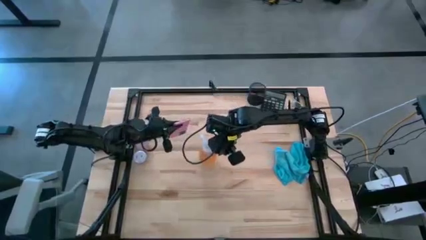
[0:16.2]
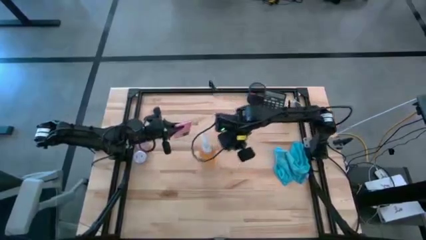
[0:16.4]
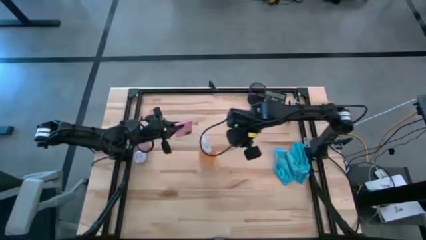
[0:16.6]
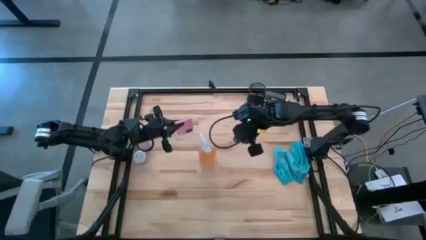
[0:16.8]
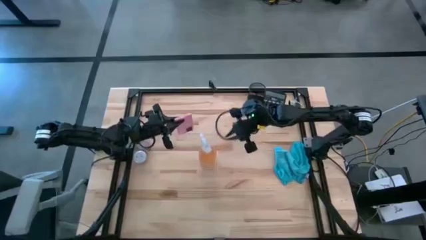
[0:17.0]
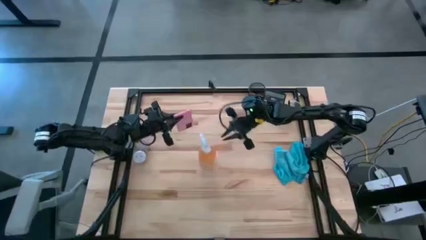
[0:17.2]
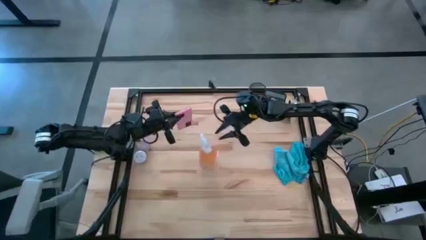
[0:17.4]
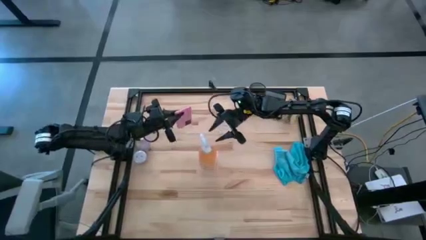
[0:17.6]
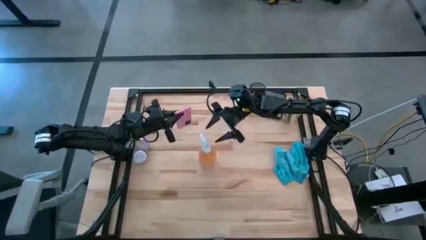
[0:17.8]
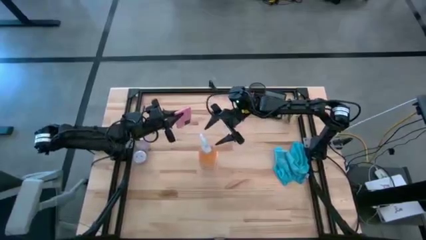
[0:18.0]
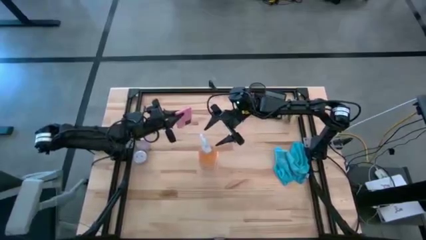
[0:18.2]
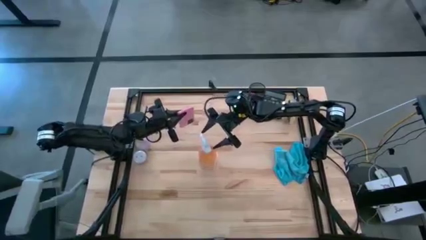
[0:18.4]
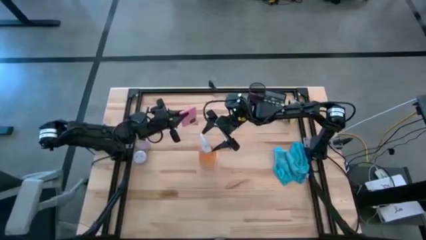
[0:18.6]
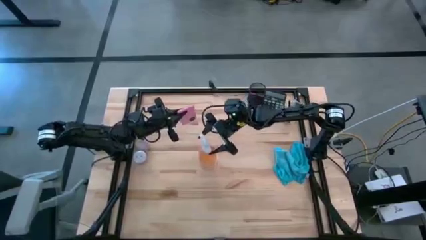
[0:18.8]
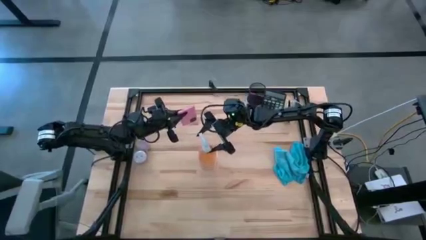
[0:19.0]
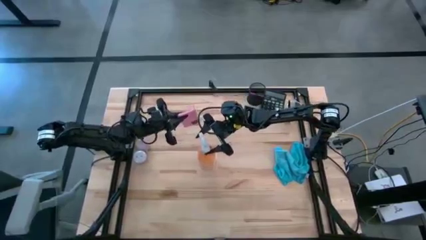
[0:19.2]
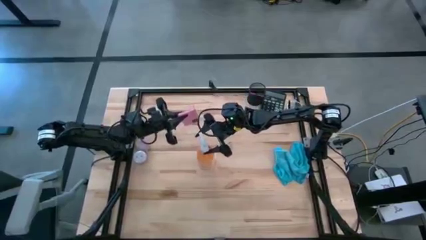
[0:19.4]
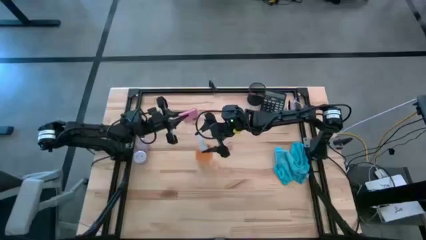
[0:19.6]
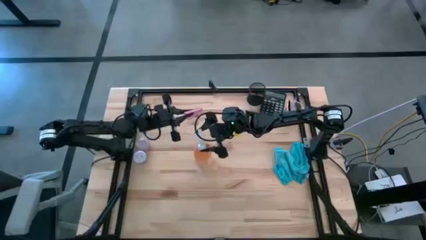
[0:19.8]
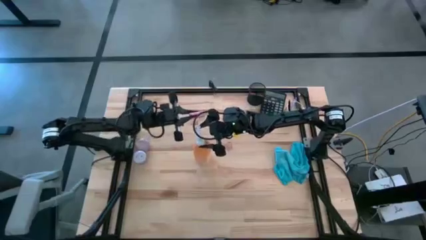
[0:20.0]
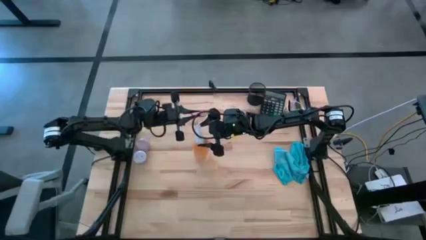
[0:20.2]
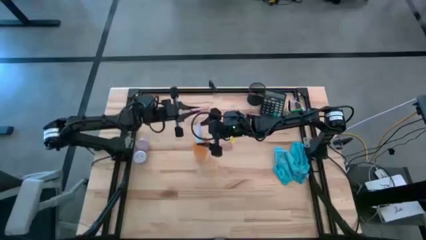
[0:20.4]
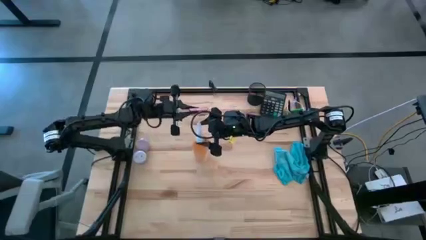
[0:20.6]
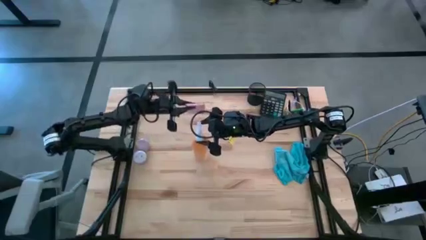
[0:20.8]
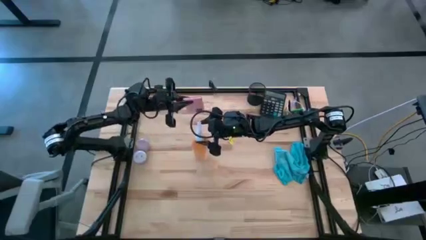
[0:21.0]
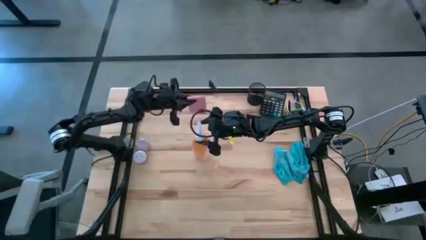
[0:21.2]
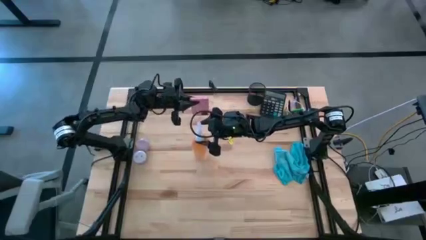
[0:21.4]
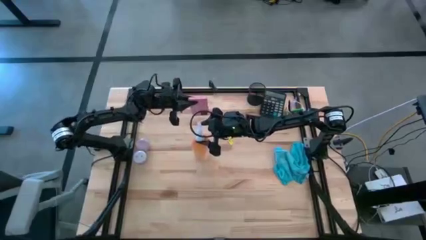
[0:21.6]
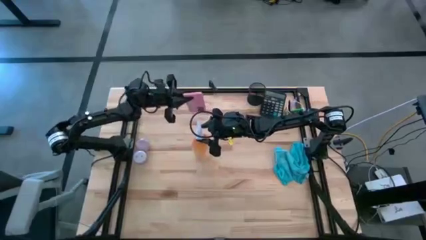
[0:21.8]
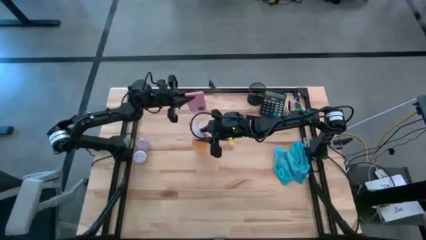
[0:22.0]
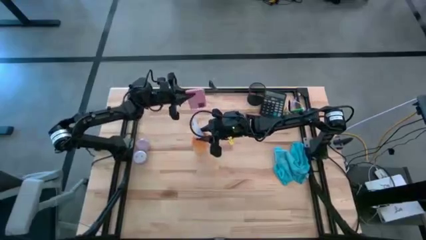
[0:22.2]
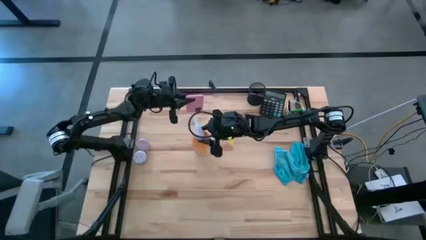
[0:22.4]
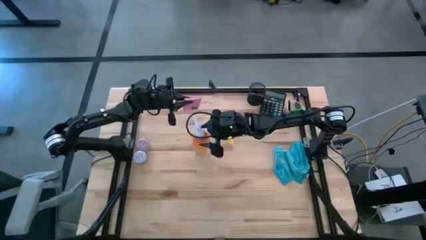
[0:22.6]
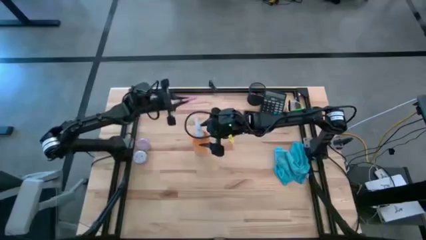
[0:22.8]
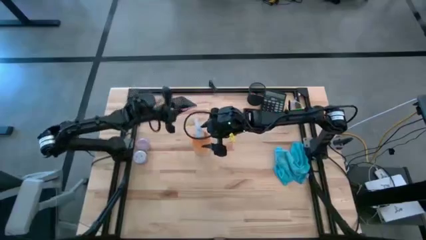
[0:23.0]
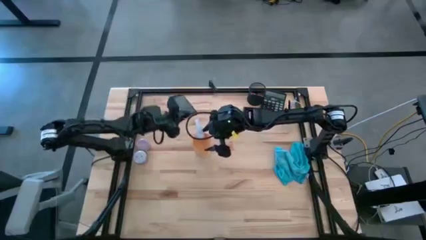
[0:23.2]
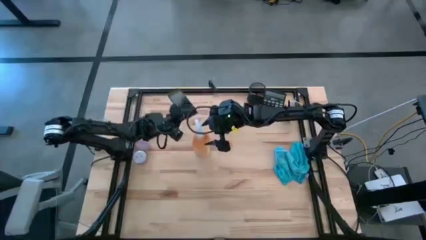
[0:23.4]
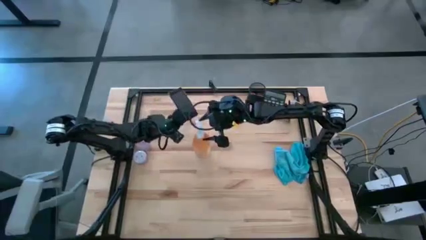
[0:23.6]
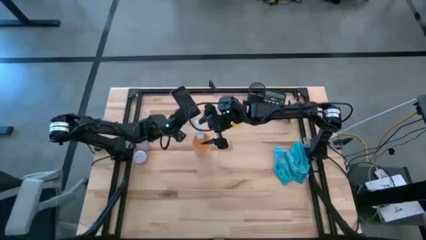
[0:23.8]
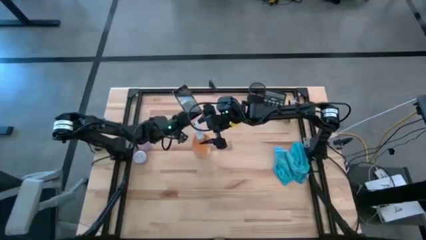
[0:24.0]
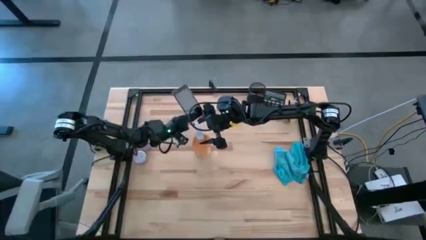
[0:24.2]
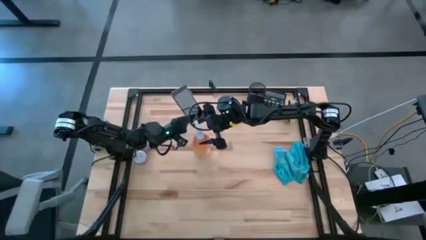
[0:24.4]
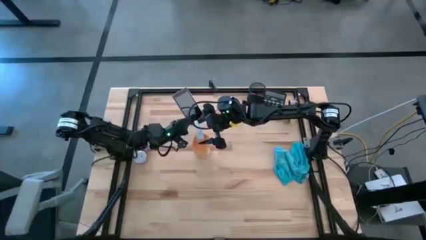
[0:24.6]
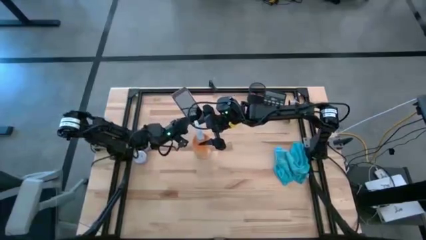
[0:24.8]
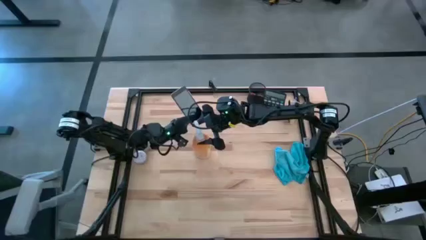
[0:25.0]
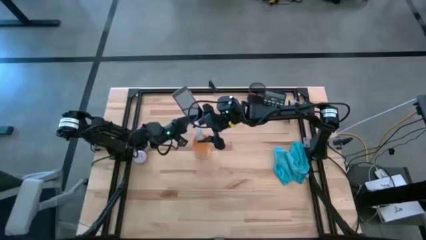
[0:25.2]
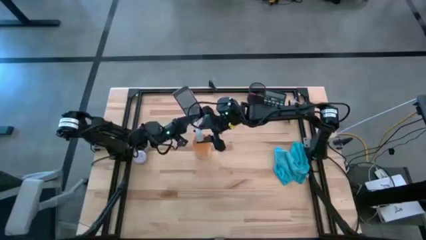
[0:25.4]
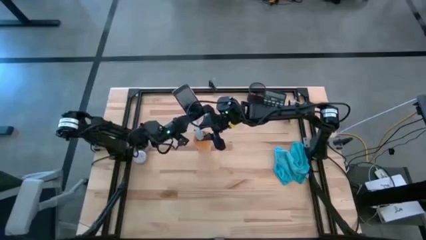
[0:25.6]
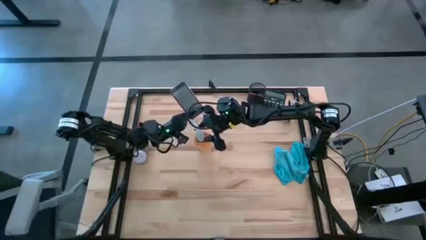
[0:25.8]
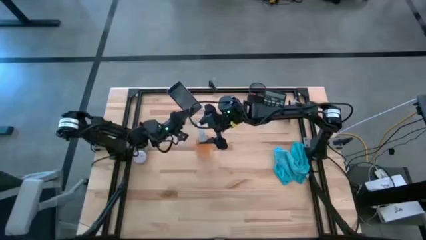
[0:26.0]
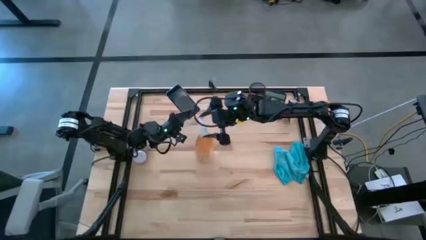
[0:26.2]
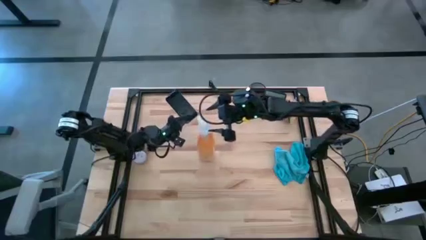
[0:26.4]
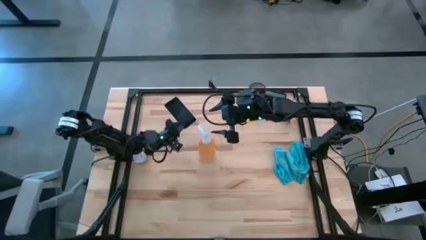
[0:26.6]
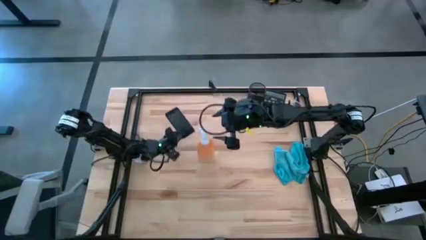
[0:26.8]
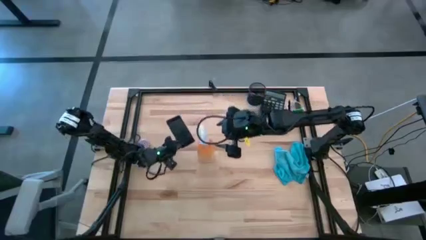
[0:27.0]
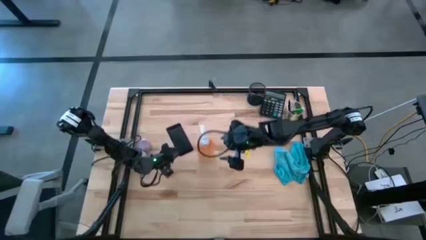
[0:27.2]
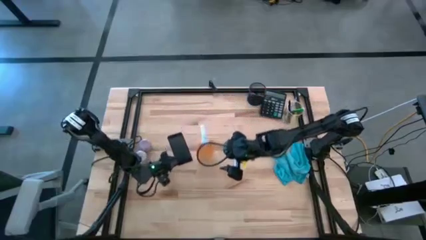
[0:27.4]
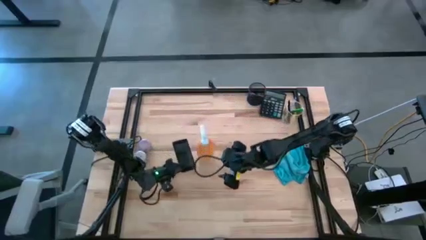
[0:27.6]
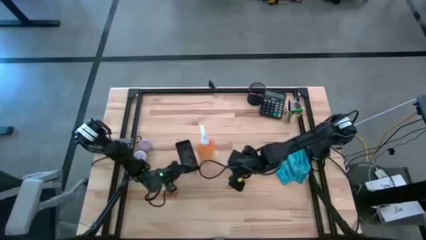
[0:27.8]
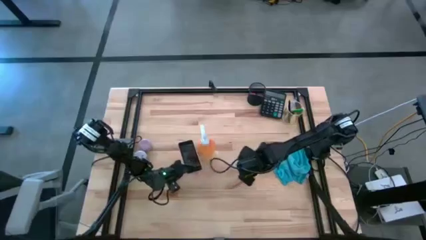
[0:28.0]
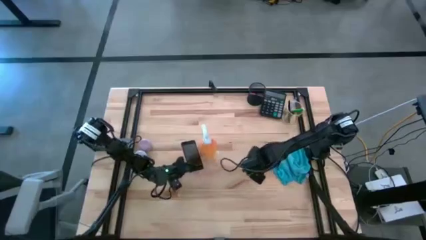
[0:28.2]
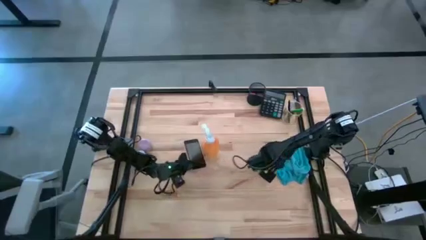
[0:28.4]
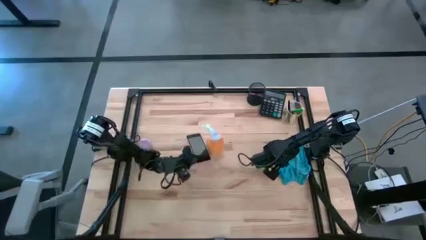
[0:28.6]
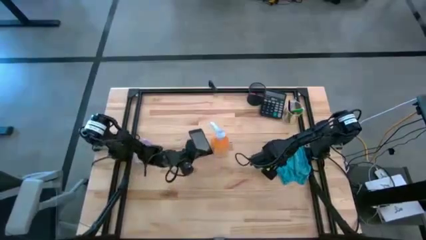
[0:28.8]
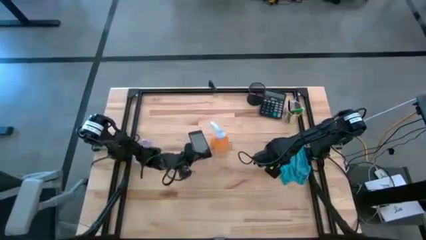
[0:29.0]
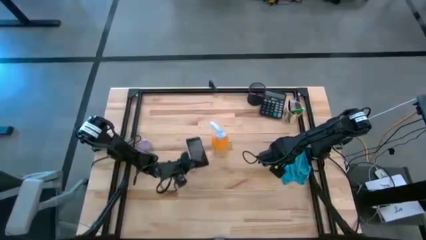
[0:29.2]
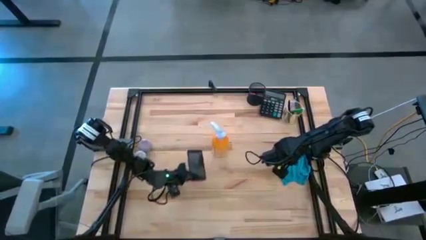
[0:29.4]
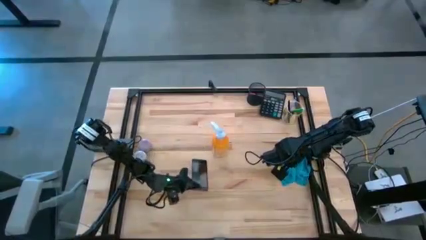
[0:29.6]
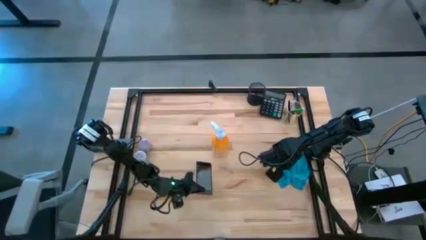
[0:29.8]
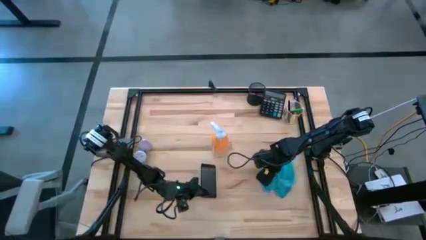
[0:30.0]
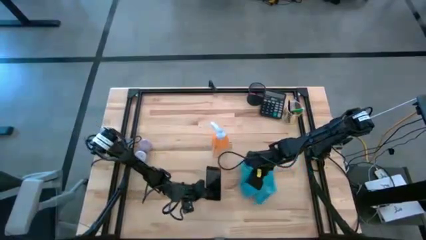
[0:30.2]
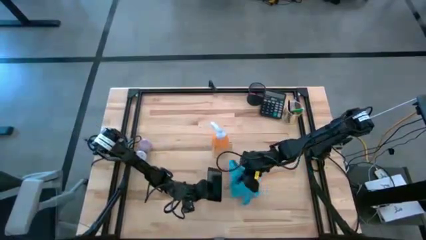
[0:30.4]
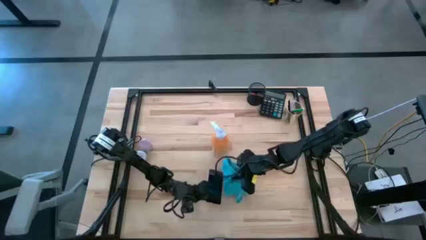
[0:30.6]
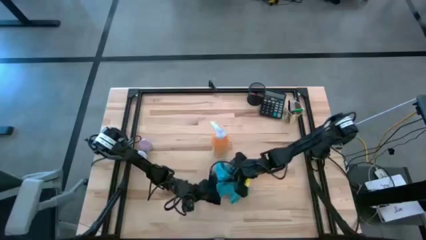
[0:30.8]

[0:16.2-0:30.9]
Task: Apply microfiber cloth
Spray the cellphone with the spray bottle
